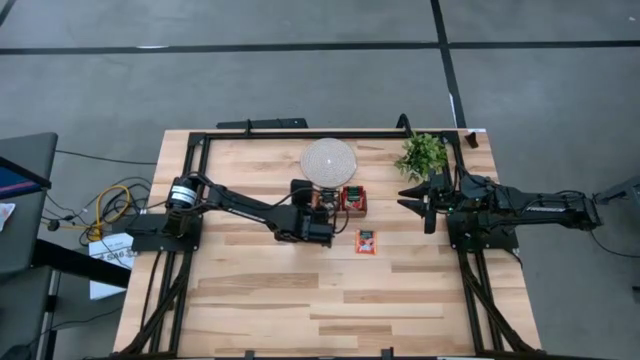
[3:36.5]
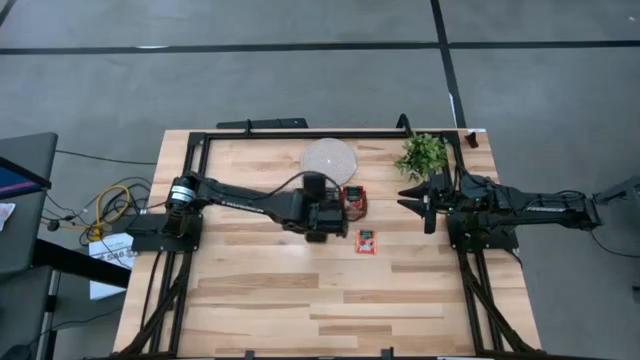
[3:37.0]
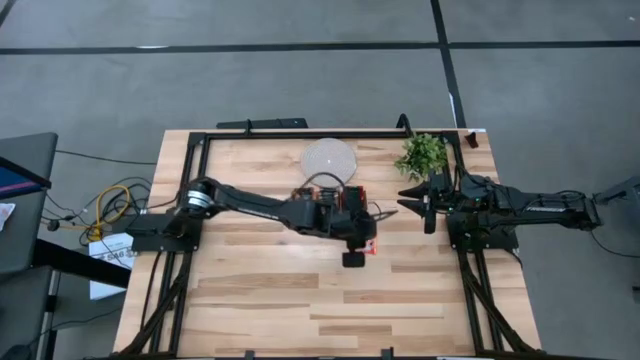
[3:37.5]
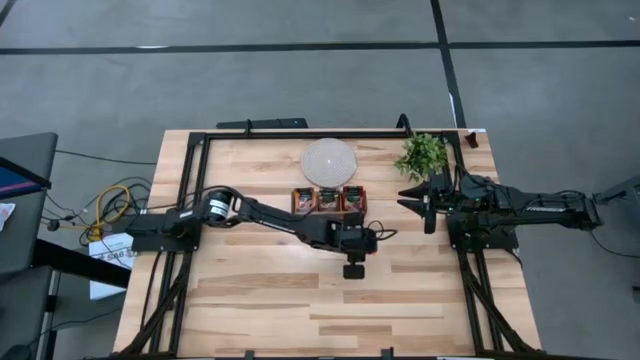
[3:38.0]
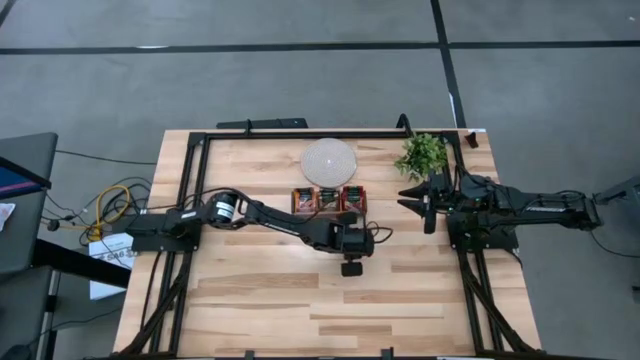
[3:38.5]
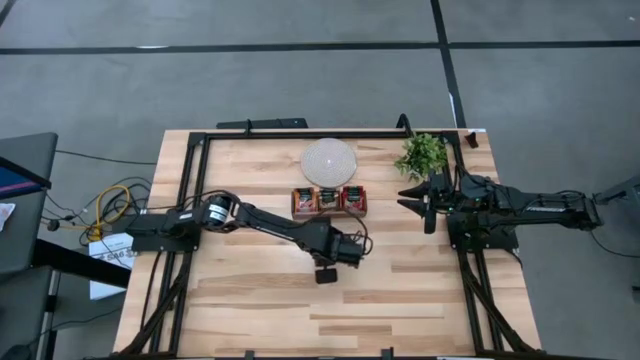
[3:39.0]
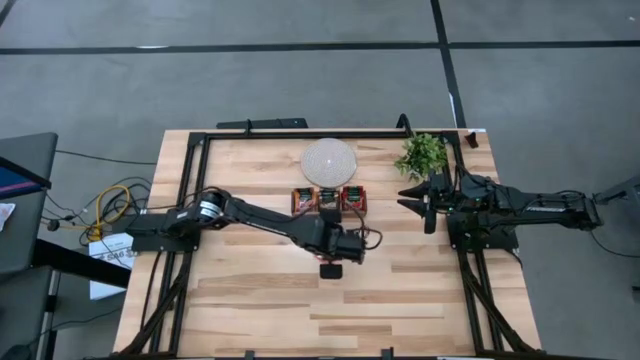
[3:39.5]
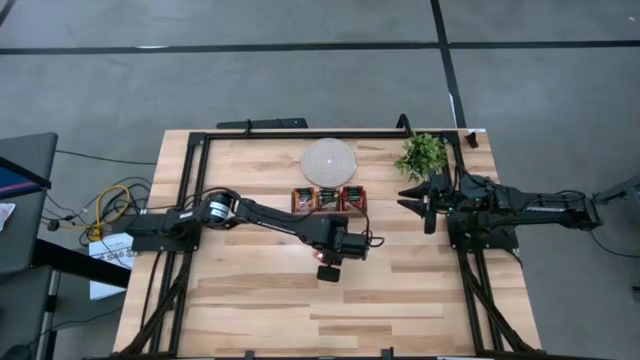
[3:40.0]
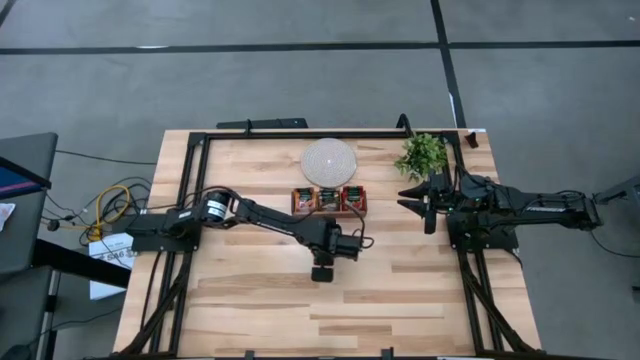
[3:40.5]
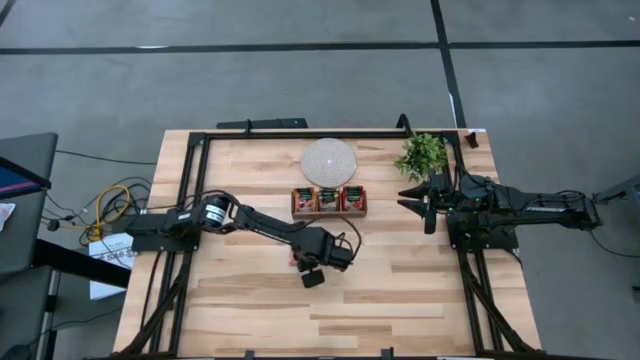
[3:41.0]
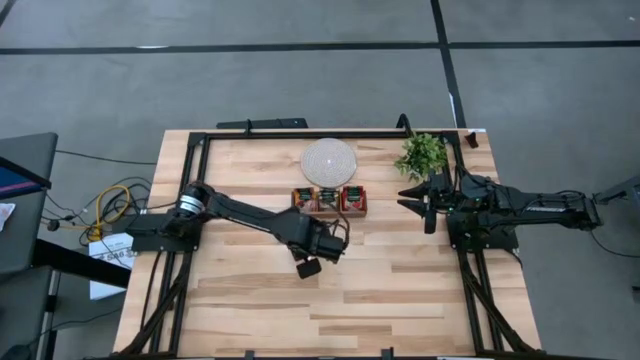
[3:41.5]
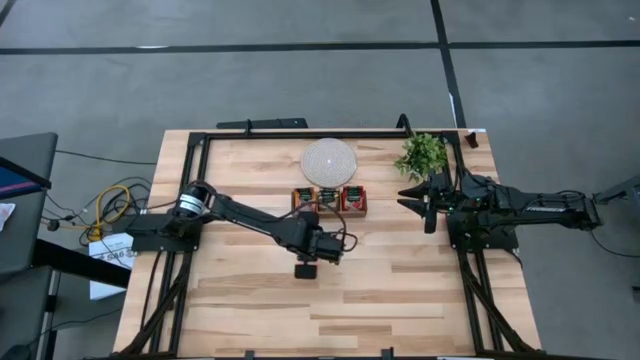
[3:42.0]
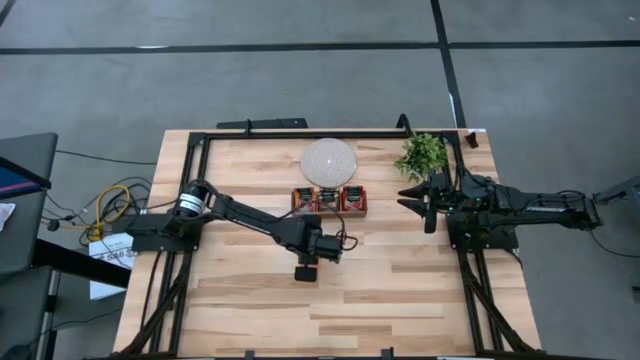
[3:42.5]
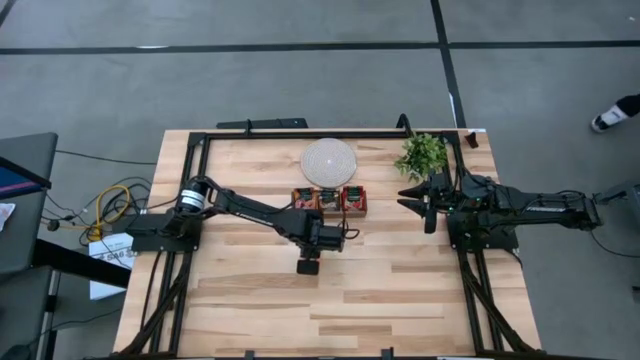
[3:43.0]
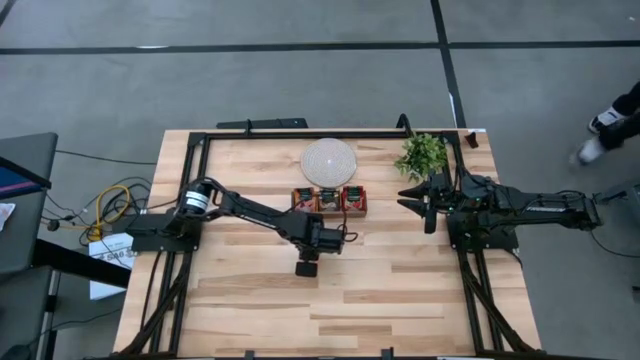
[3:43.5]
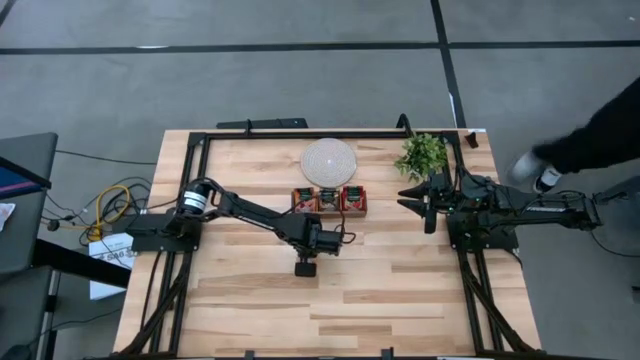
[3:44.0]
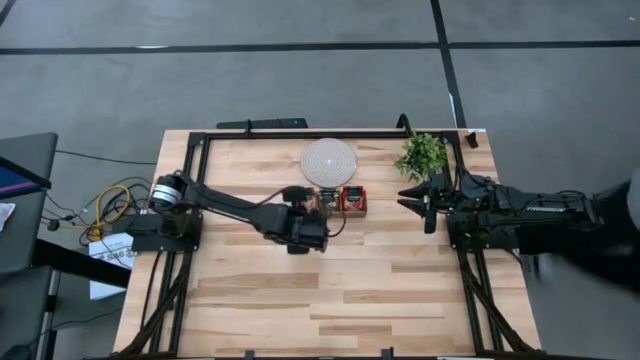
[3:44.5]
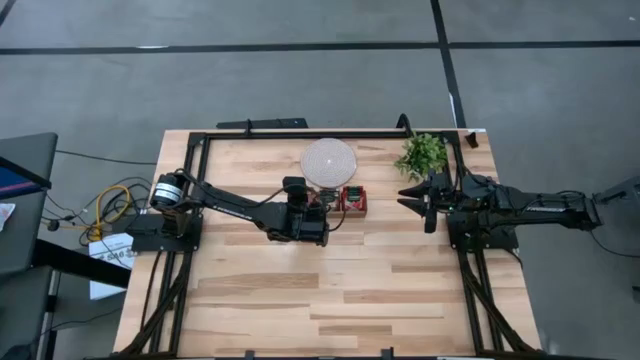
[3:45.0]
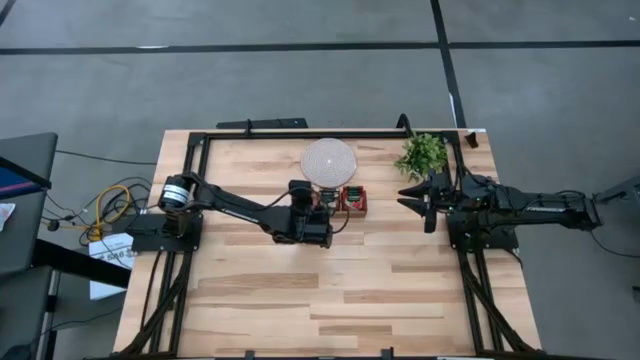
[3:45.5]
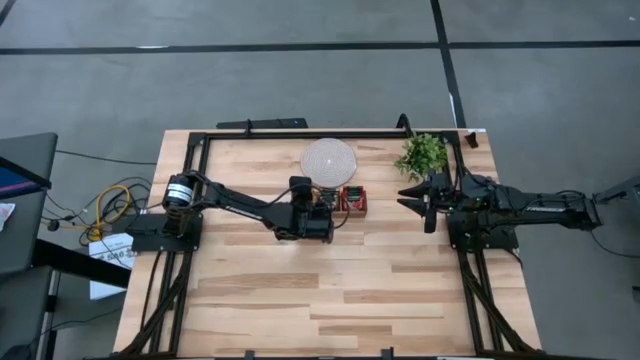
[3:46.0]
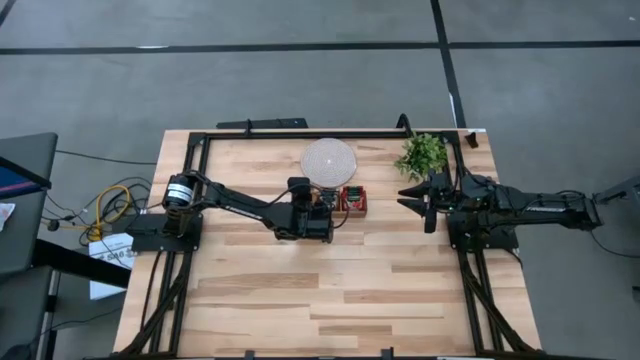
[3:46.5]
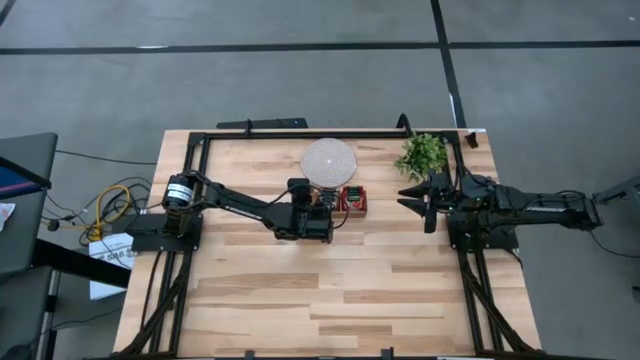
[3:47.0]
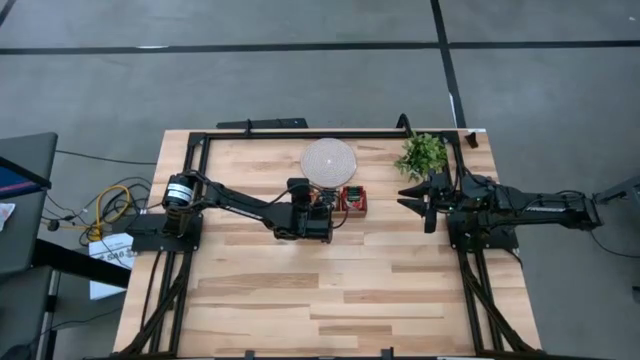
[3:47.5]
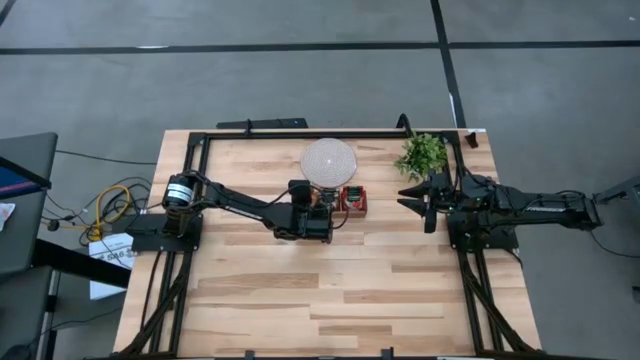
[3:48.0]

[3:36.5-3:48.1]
Task: Pick & Place Tea
Put the orange tea bag into the left slot of the wooden organizer

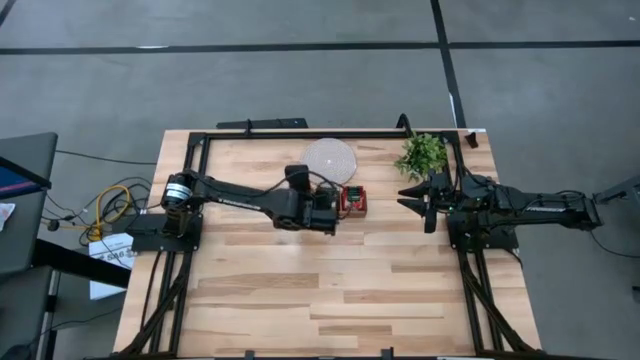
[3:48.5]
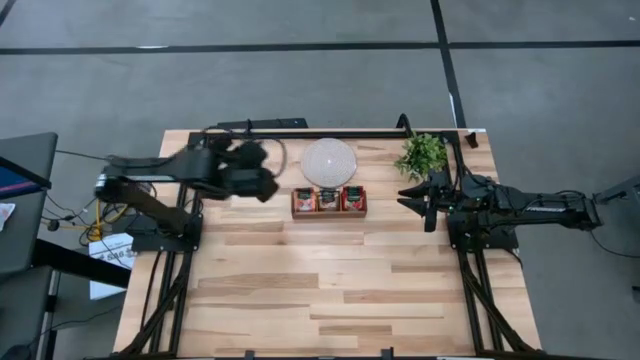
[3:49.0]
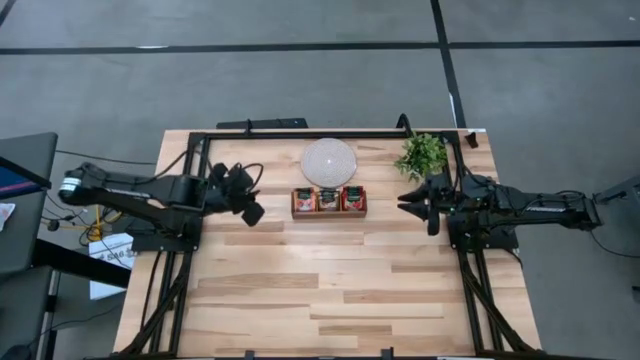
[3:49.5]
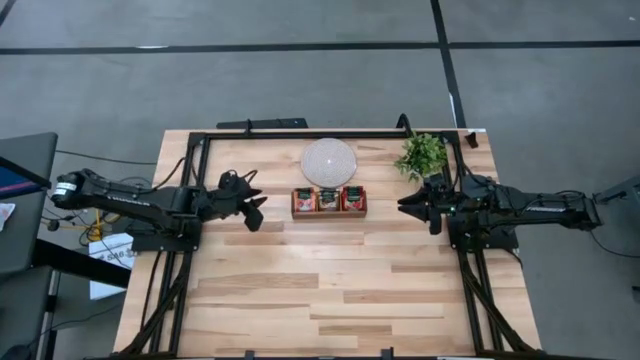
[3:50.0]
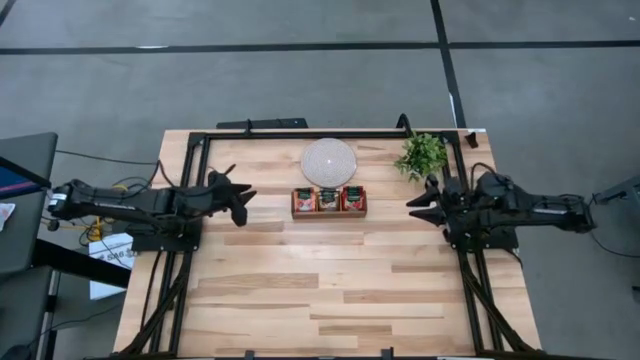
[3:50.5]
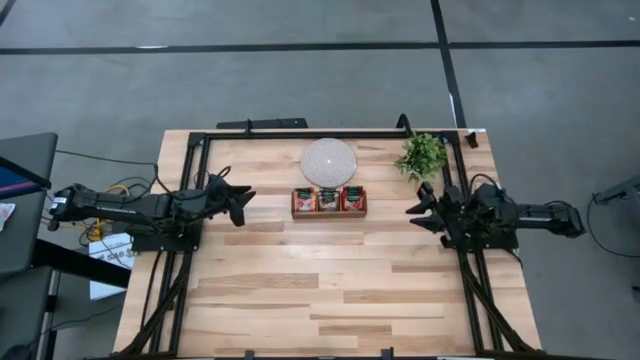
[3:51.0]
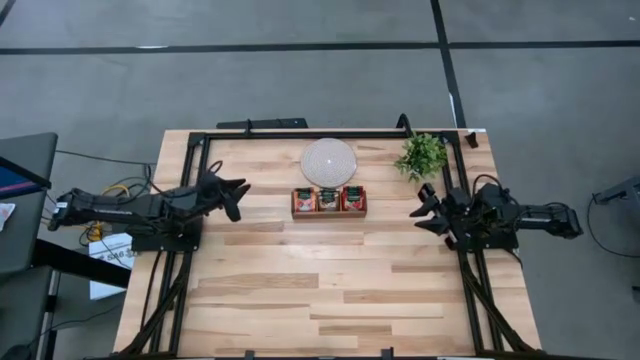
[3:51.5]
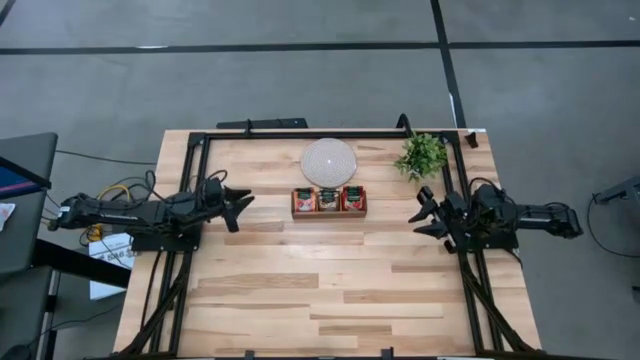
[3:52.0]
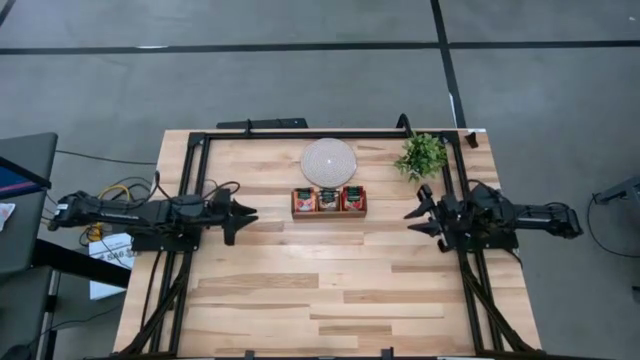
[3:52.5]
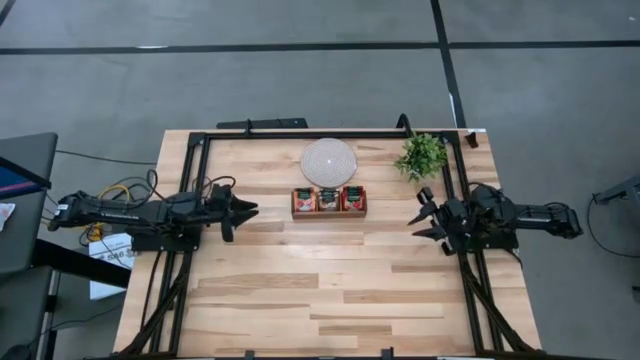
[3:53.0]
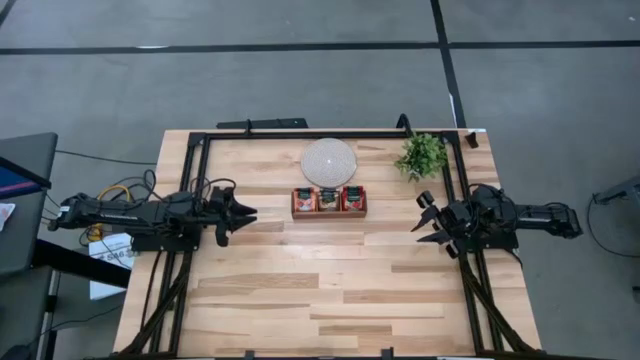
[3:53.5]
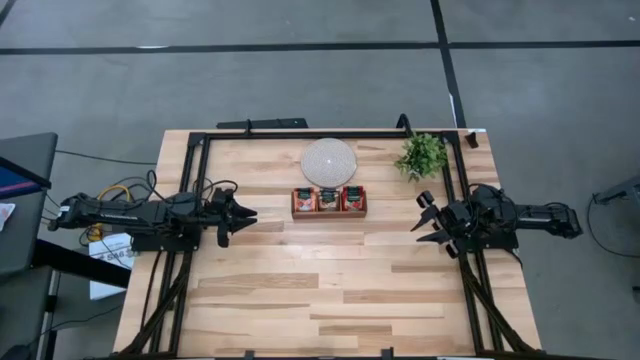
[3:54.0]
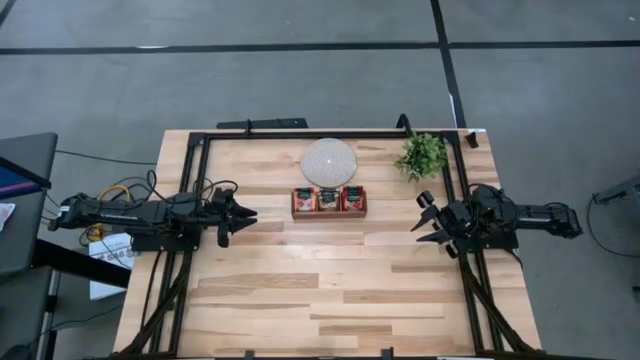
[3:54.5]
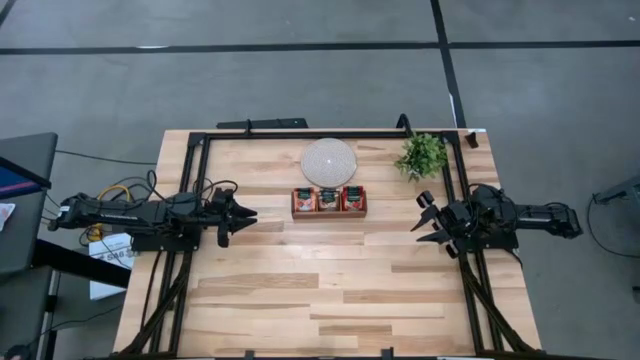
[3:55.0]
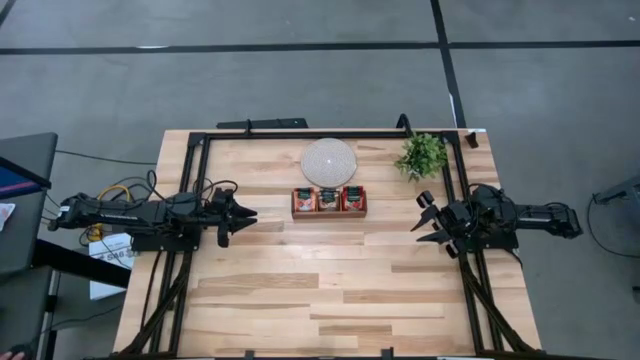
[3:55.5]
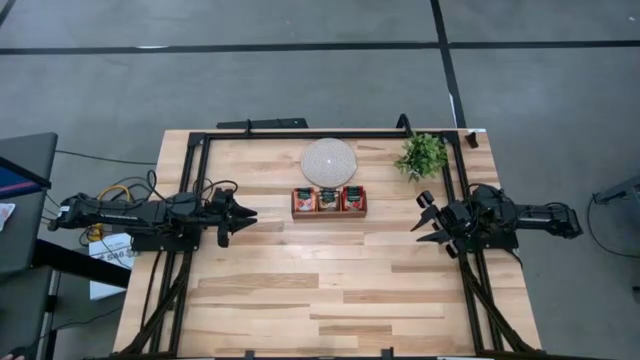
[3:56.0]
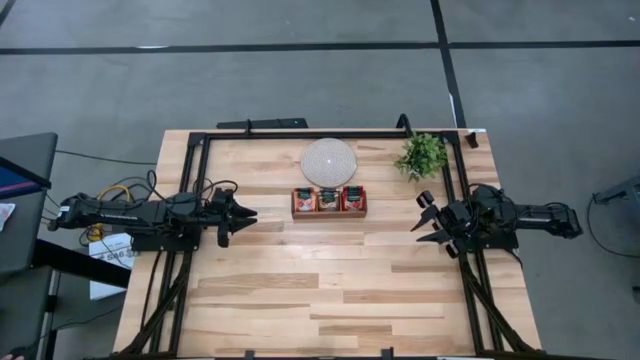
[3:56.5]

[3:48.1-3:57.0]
Return to Home Position
